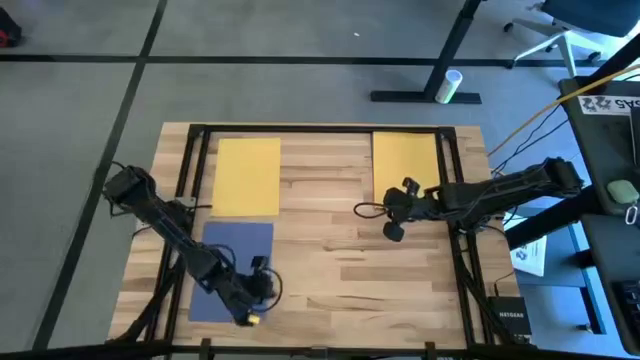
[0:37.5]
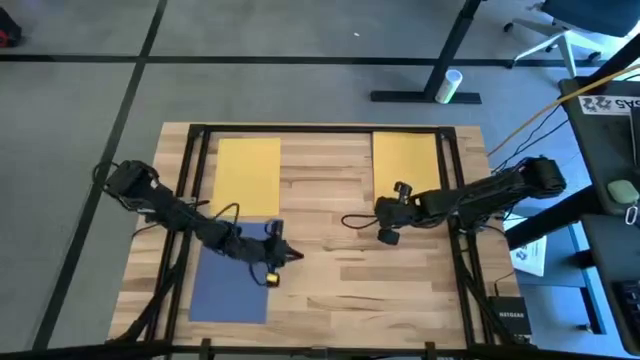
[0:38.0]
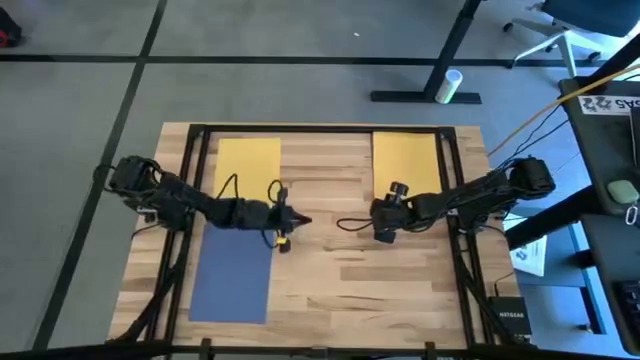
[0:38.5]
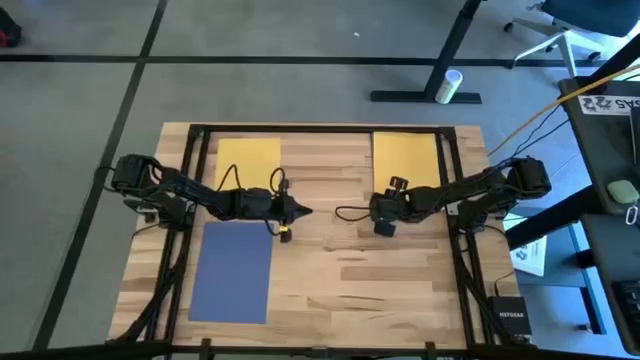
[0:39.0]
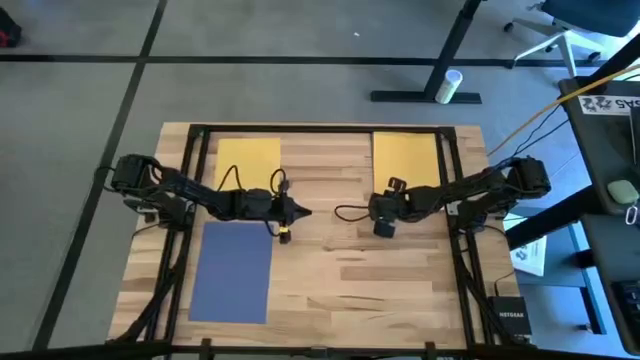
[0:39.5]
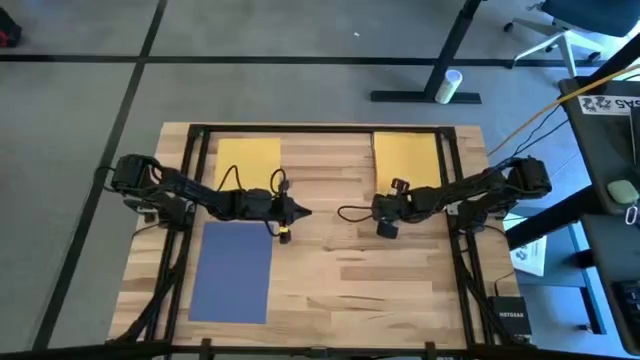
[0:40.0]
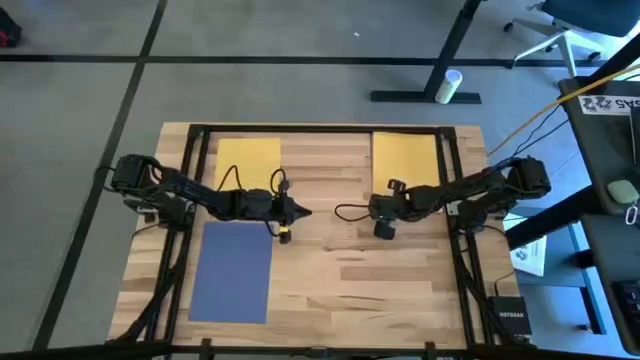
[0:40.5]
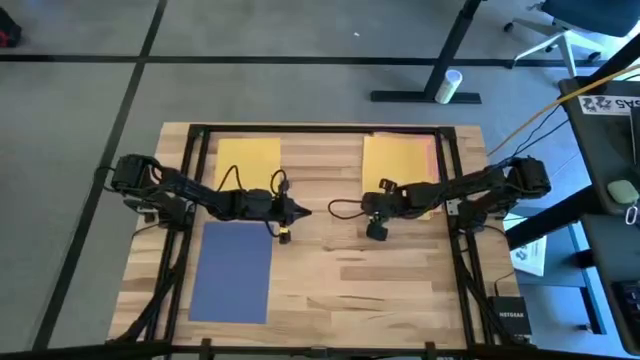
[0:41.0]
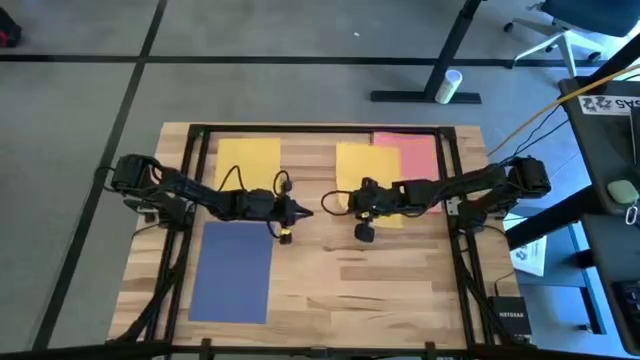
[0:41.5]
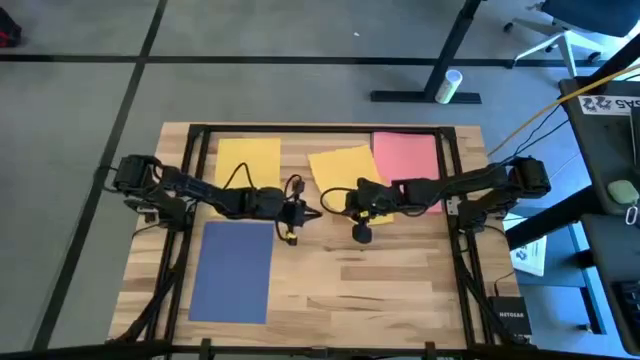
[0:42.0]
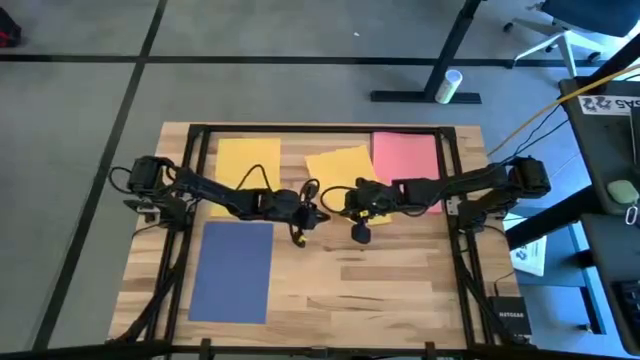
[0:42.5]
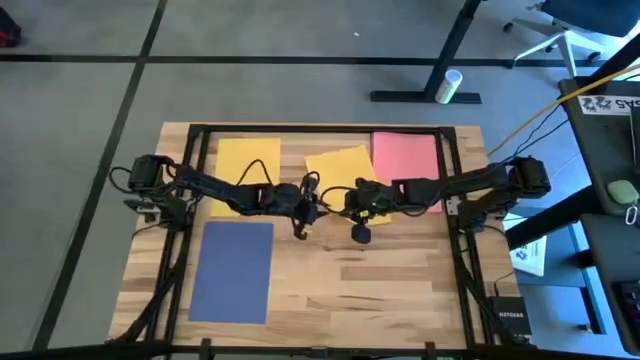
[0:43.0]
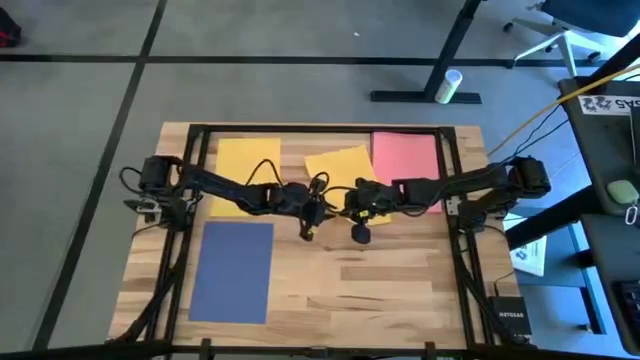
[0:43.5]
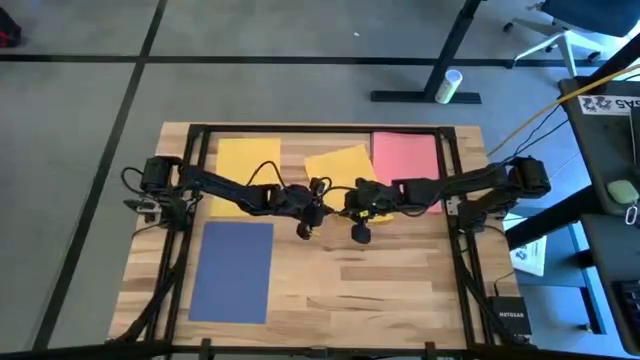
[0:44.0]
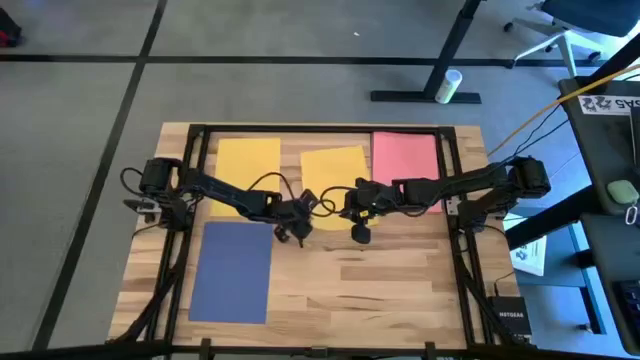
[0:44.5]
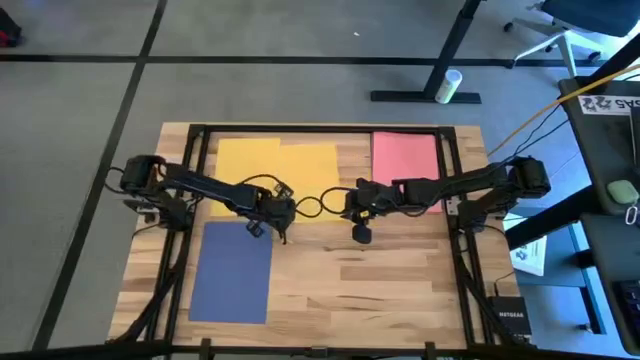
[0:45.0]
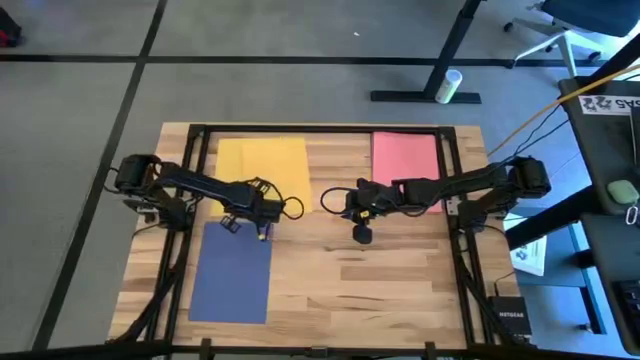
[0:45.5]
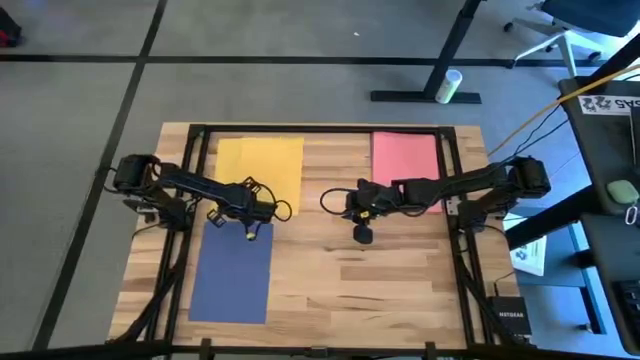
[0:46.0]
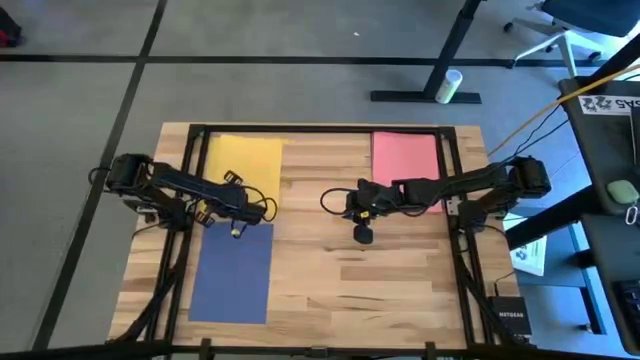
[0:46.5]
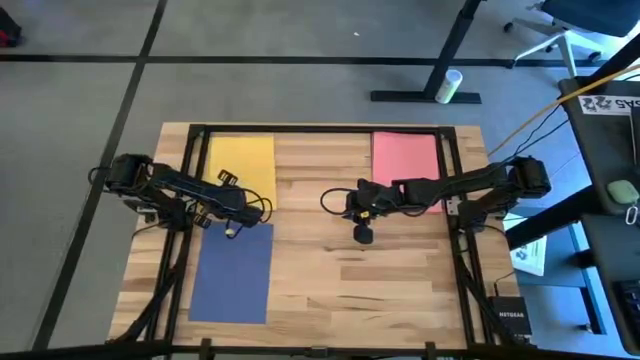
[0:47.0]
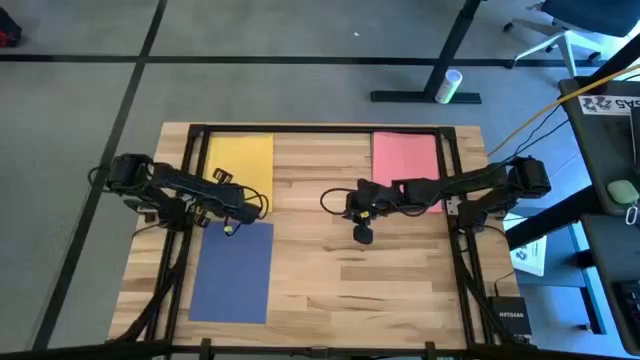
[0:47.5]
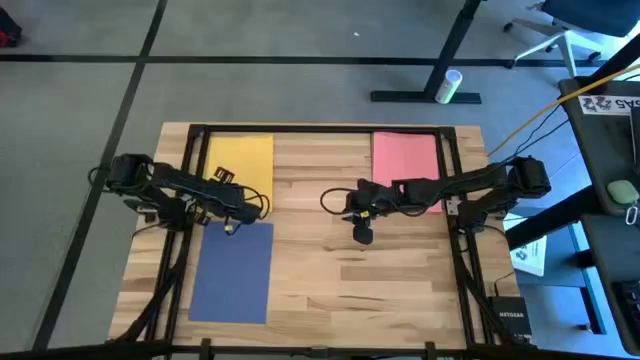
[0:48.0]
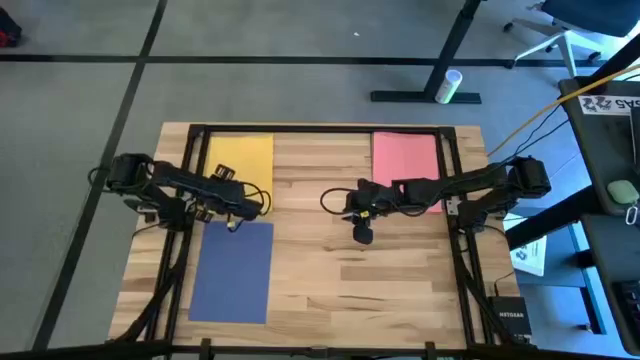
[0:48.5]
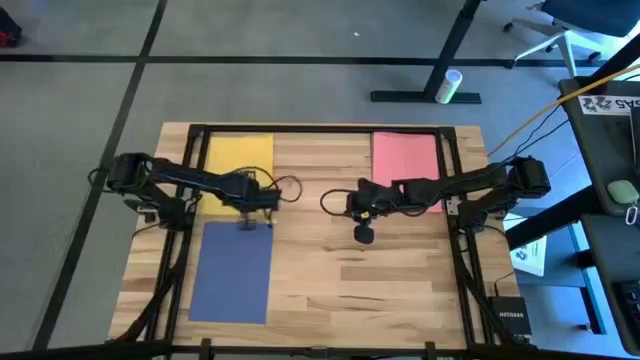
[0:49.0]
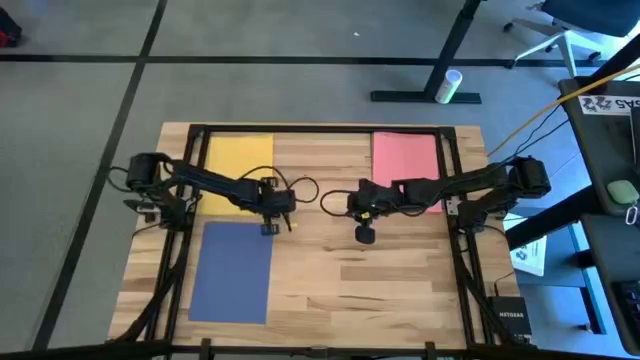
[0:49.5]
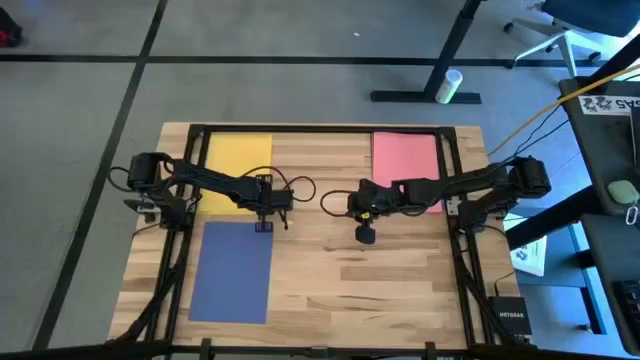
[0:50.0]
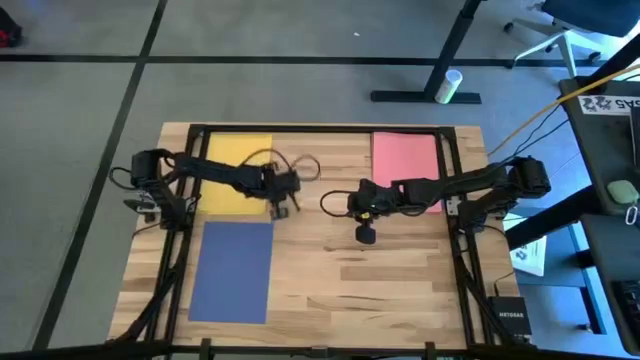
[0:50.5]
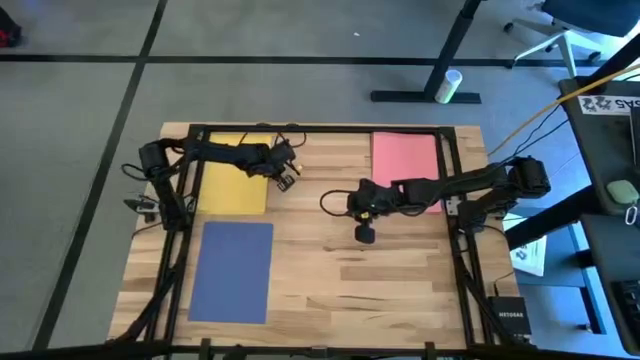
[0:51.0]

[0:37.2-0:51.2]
Task: Organize paper
Stack the yellow paper on top of the yellow paper
